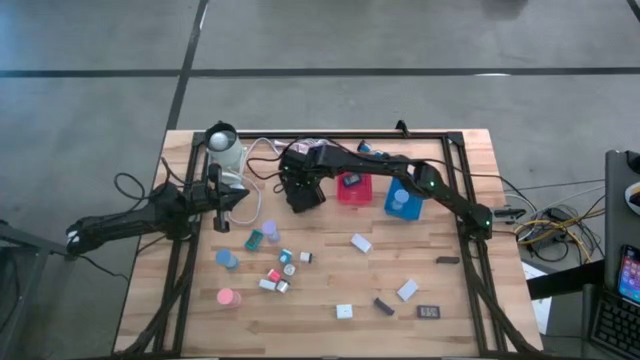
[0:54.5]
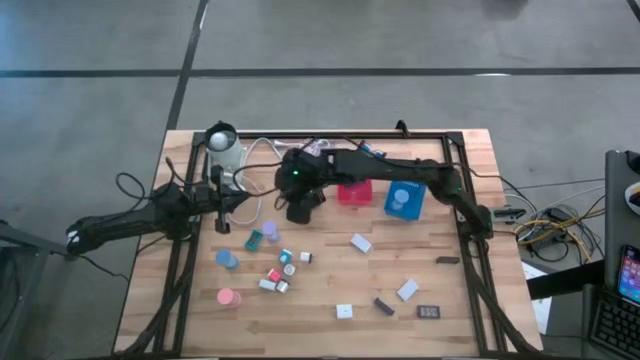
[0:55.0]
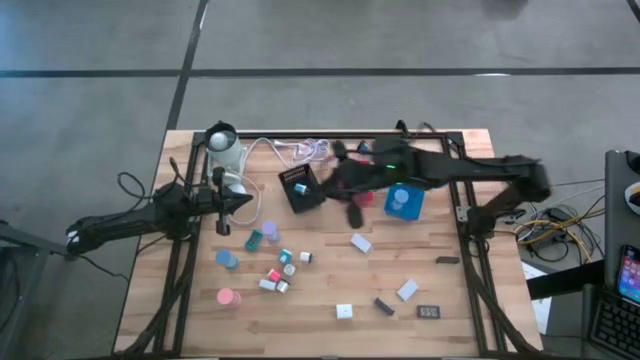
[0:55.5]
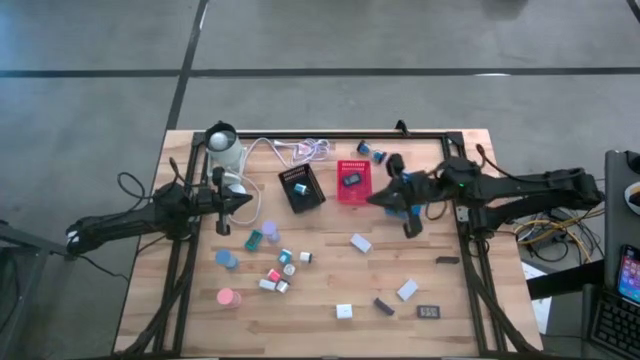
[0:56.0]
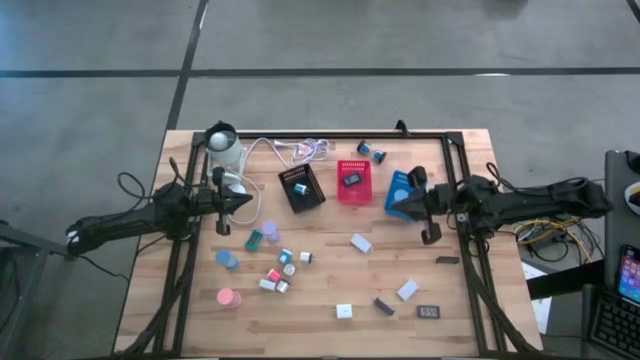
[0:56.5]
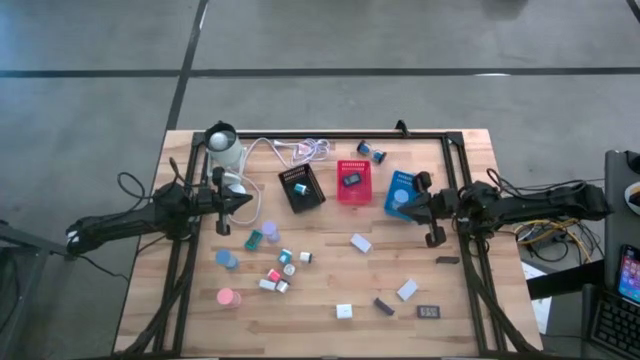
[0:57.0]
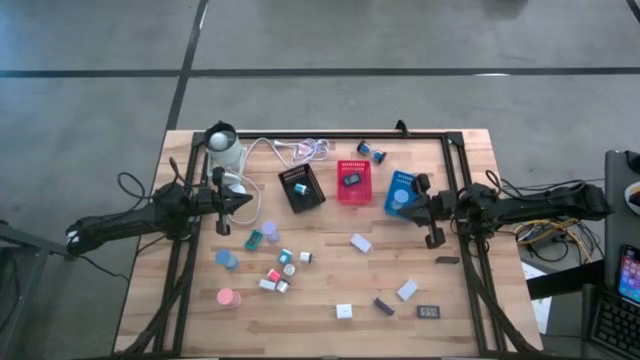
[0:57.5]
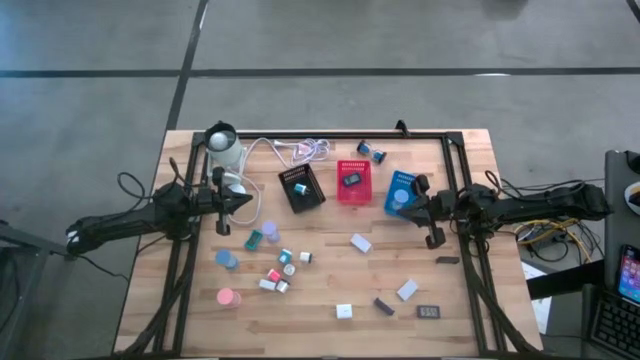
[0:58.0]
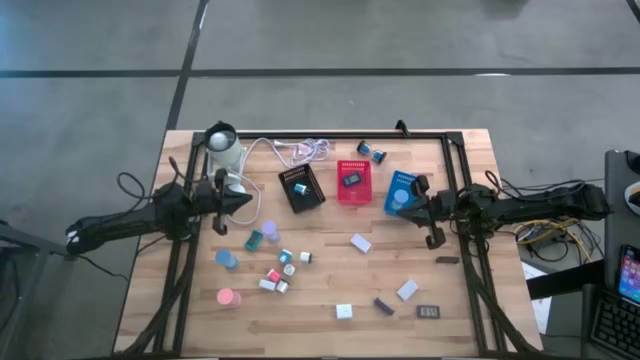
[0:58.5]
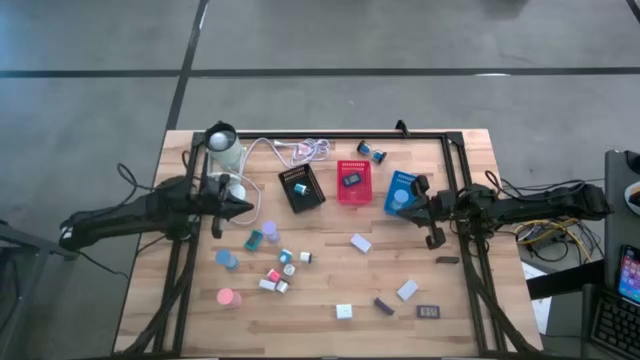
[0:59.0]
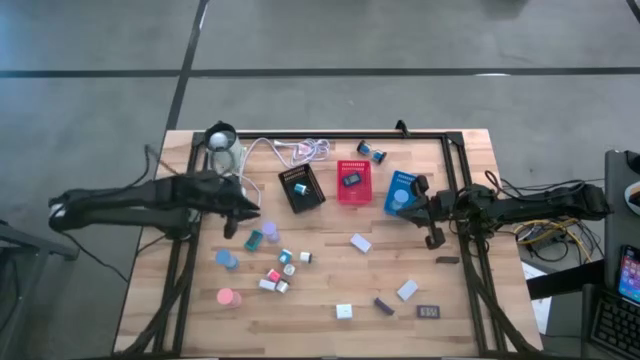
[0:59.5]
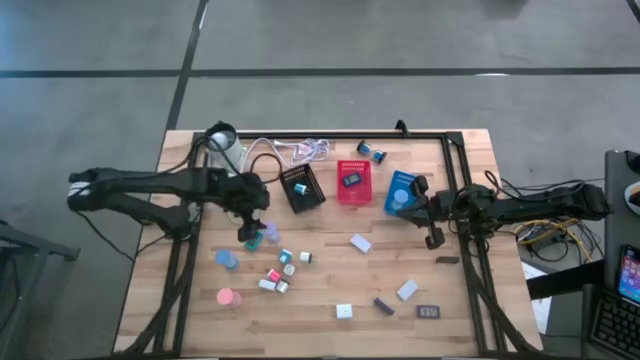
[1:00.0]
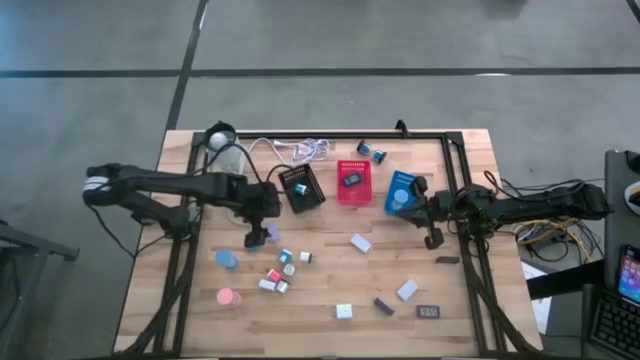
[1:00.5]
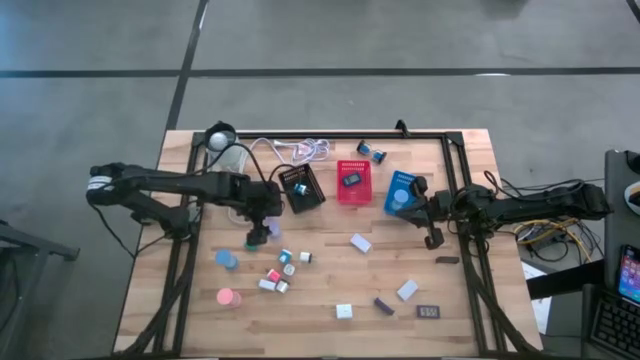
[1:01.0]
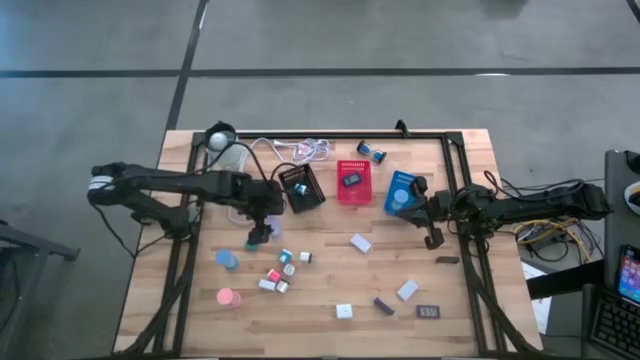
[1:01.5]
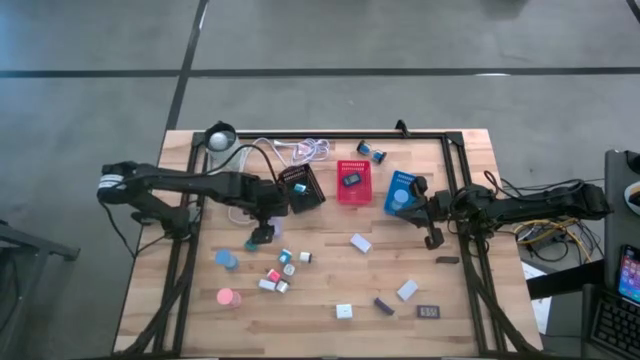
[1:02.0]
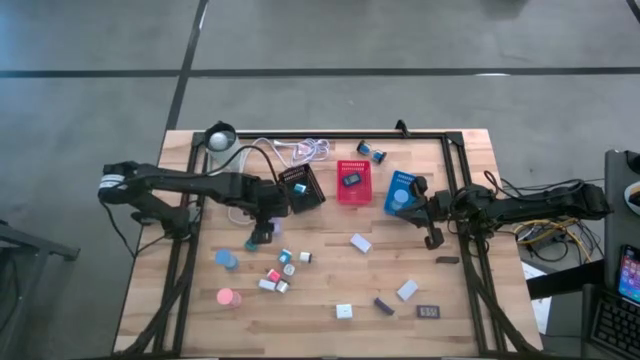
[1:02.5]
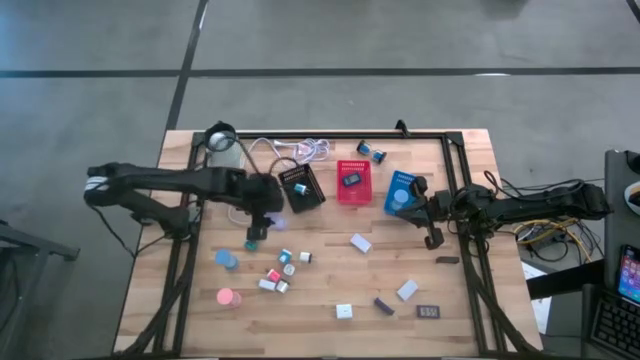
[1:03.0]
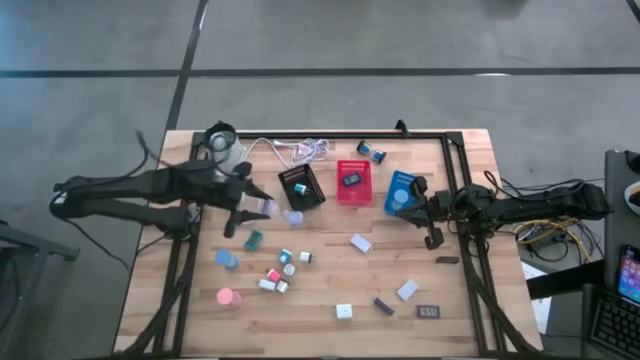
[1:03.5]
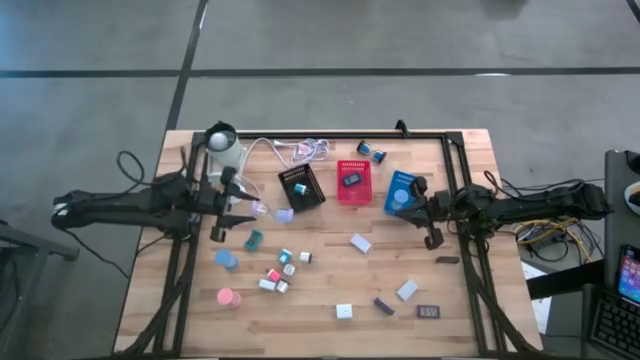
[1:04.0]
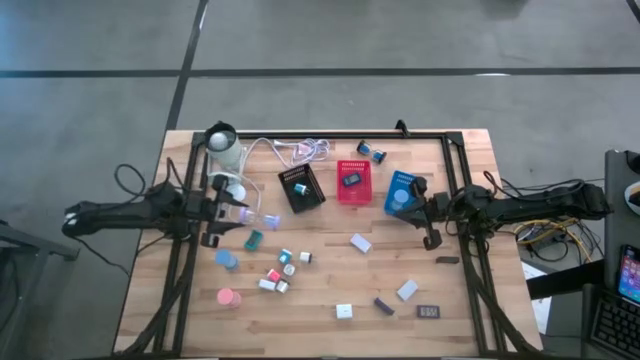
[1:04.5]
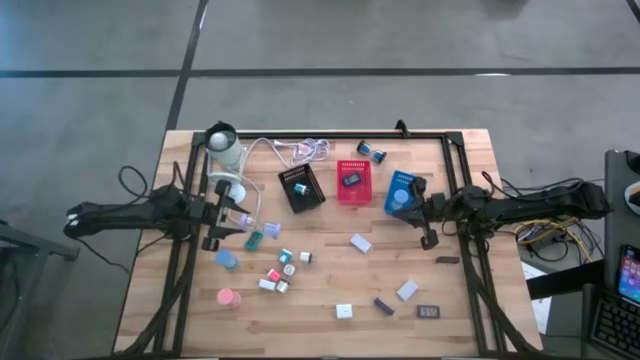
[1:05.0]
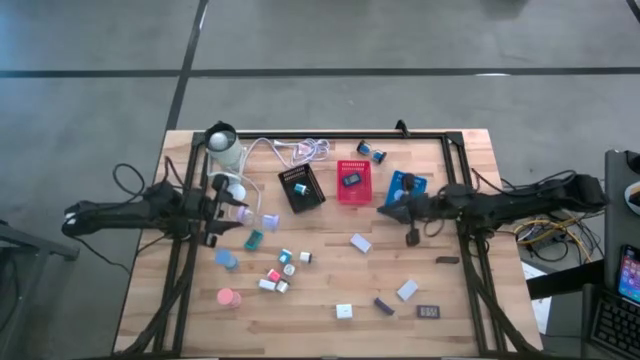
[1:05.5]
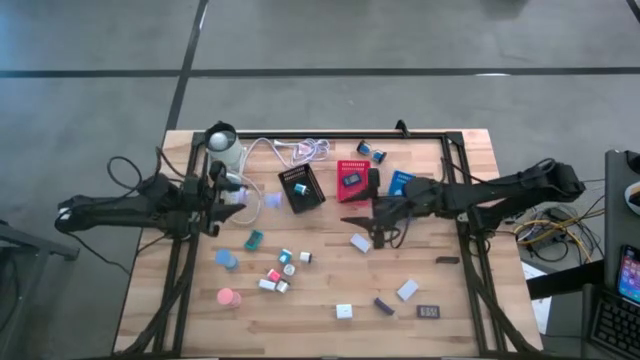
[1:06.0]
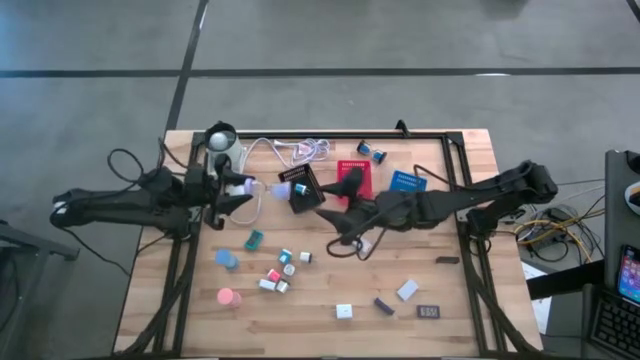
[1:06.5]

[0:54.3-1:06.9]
Task: Pick & Place Office items
Put the purple hourglass into the blue bin

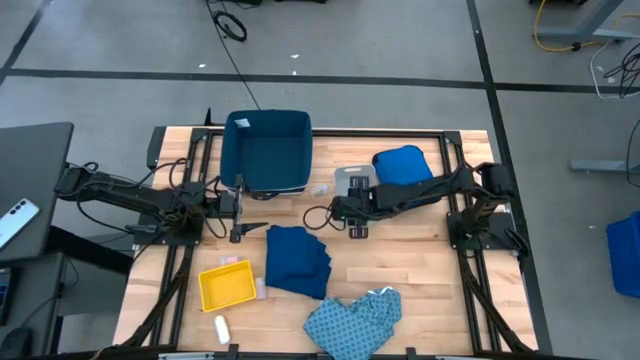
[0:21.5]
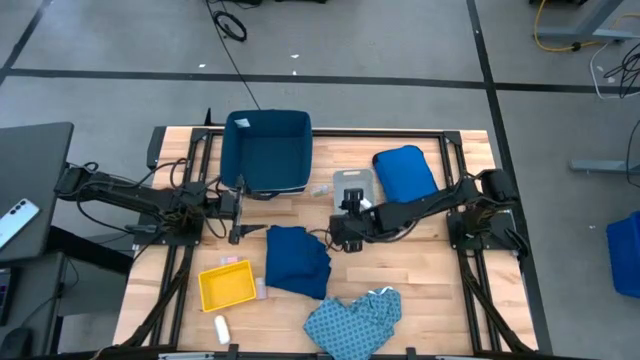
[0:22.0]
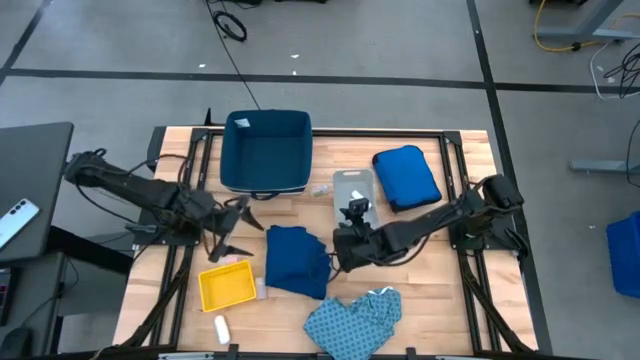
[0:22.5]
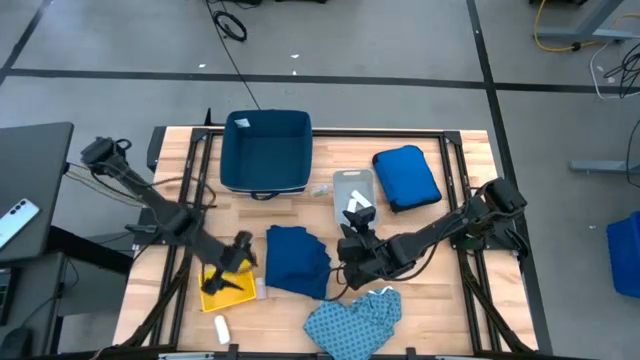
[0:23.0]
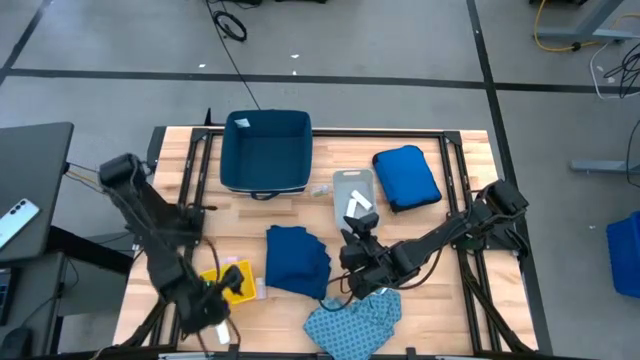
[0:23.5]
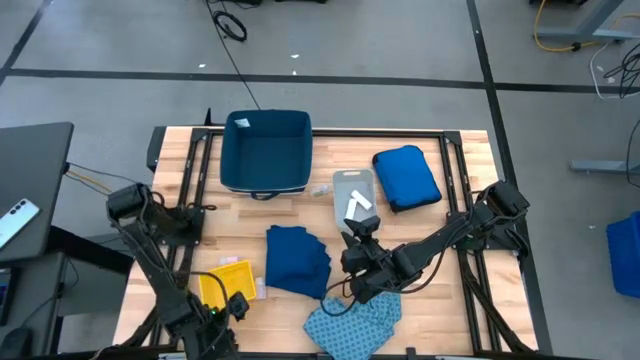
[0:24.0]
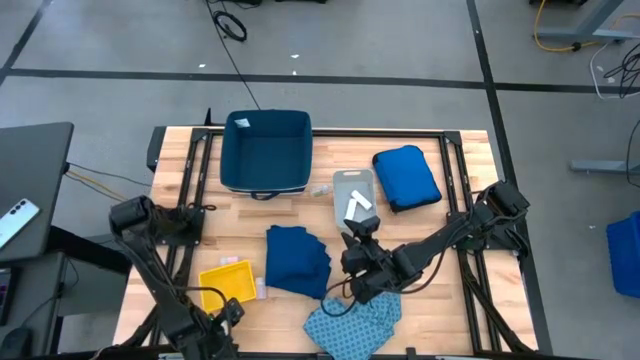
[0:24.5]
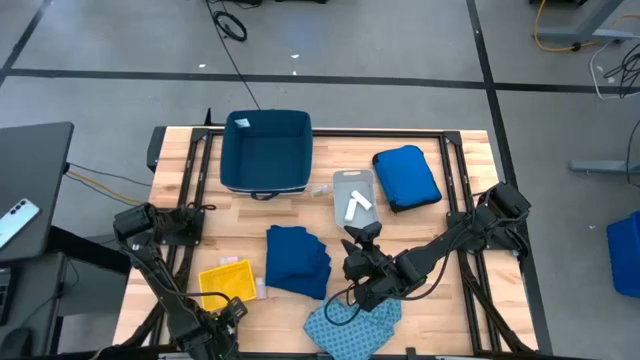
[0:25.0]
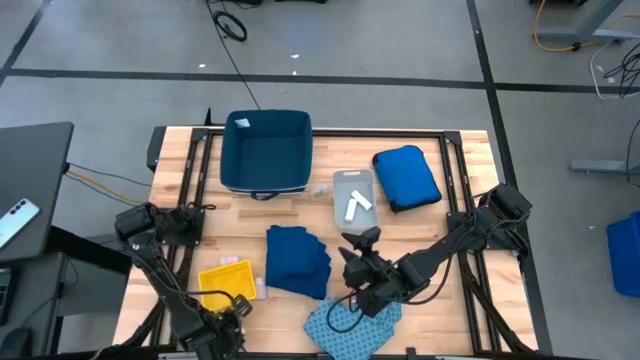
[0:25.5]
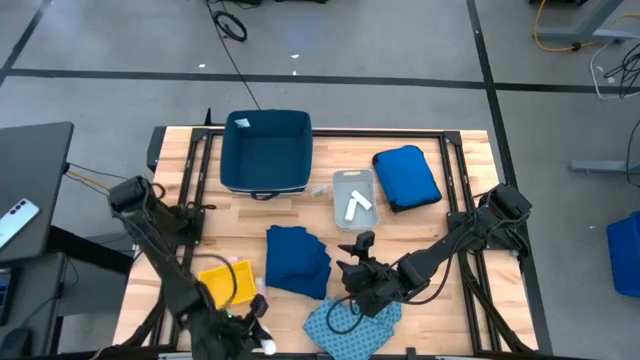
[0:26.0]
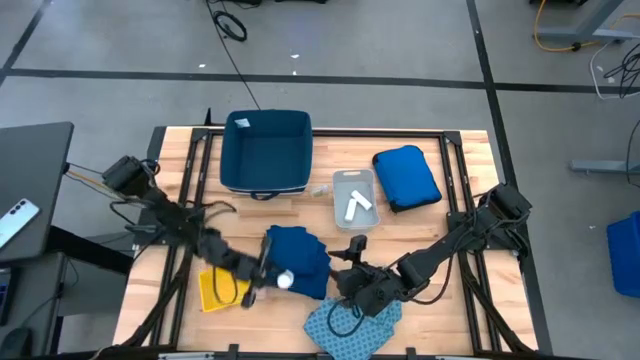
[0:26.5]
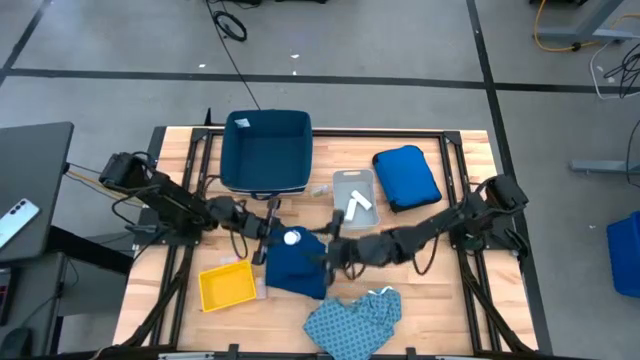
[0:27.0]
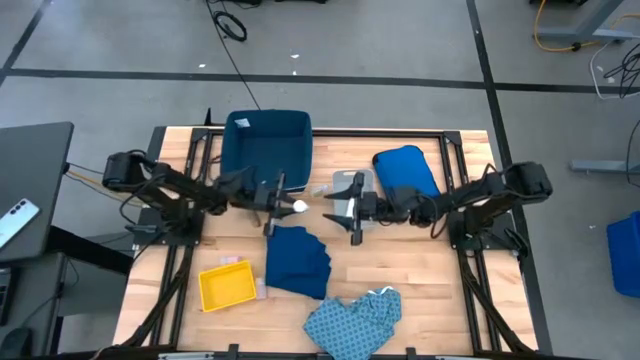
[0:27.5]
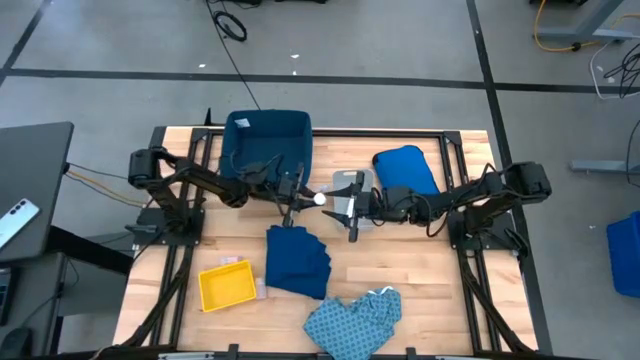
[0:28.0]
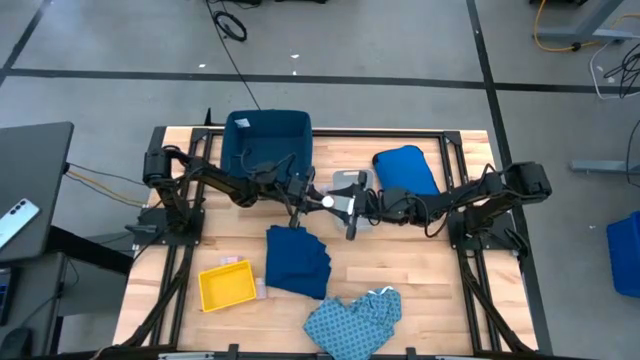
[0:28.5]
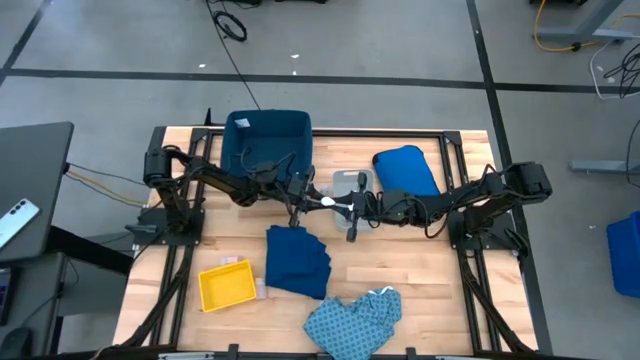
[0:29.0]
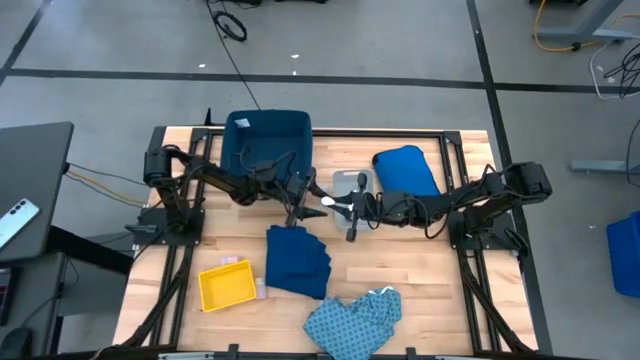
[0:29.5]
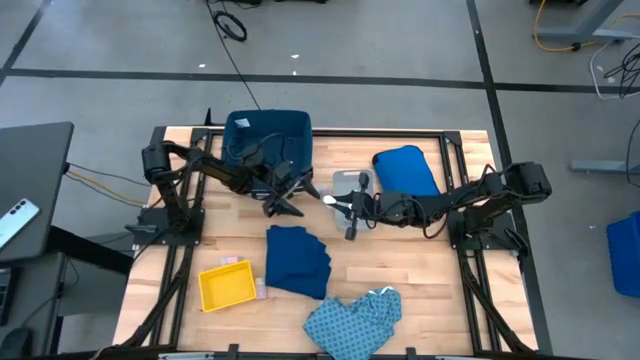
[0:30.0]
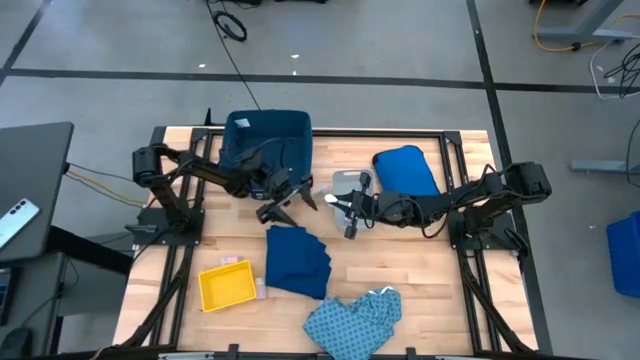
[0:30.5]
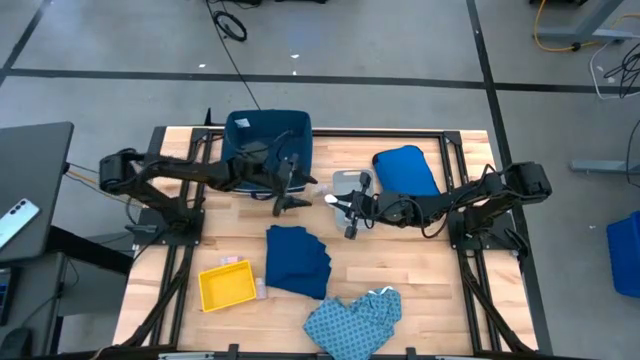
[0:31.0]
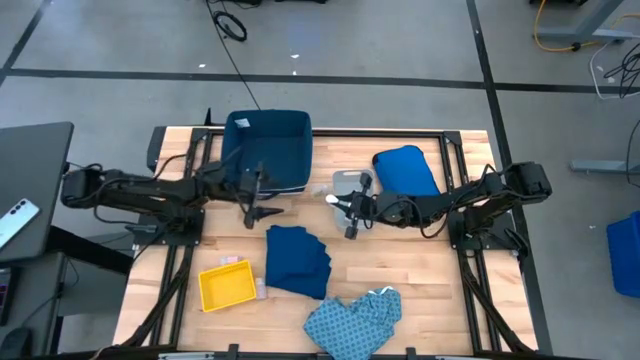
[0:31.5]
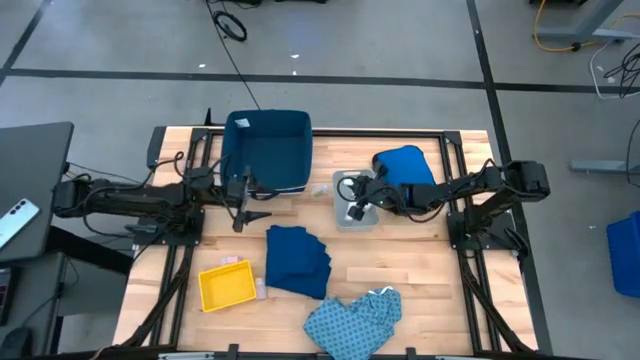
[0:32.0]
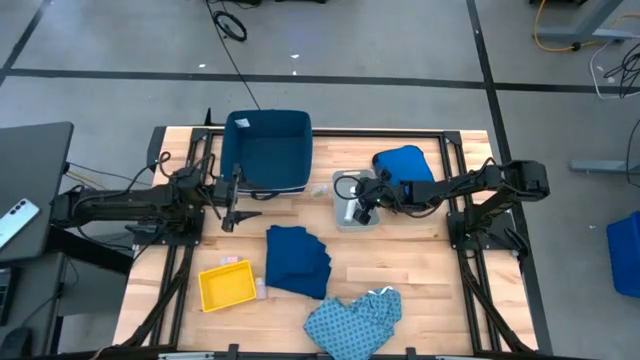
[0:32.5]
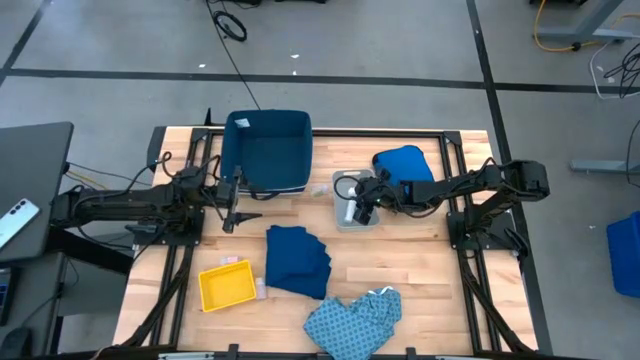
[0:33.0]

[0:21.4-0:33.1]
Task: Pick & place medical supplies in basket/bin
Put the white rolled gauze into the gray bin
